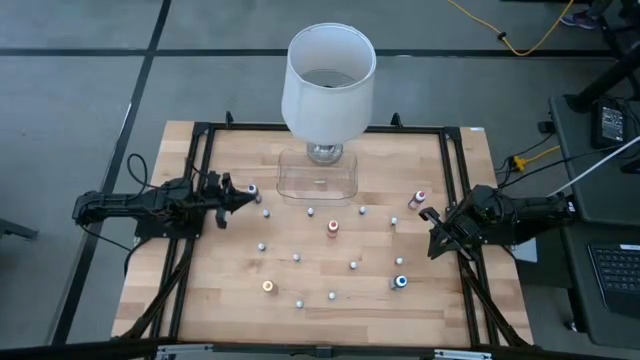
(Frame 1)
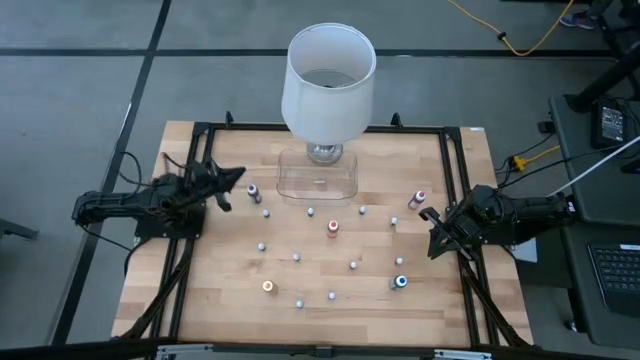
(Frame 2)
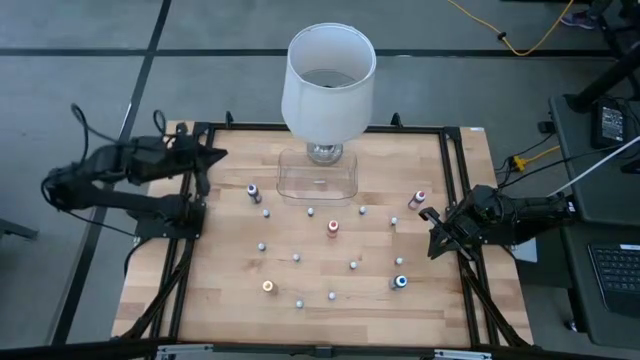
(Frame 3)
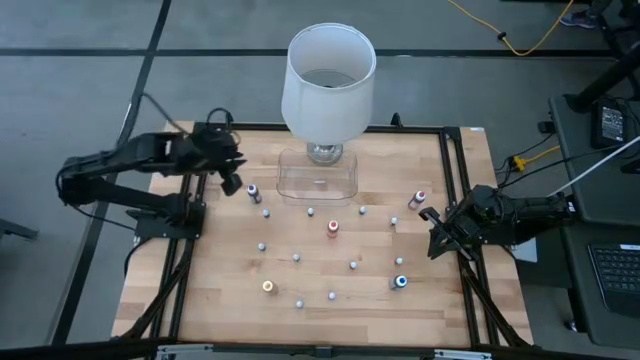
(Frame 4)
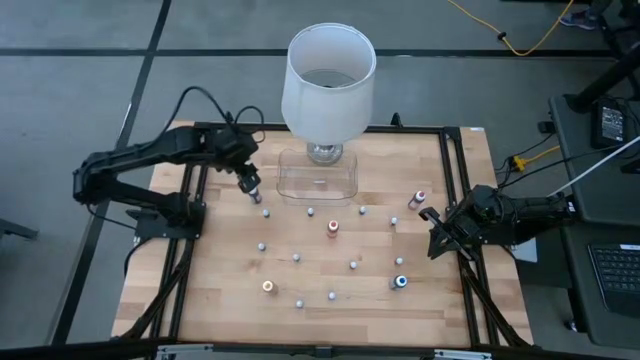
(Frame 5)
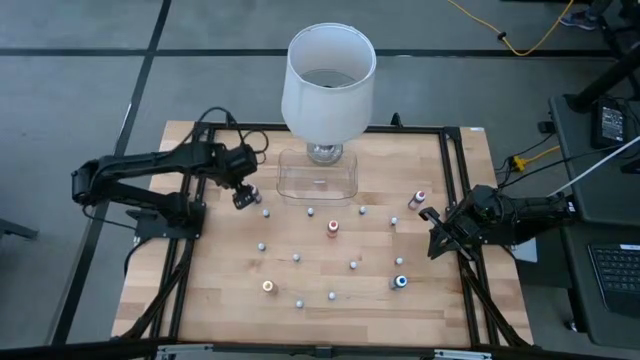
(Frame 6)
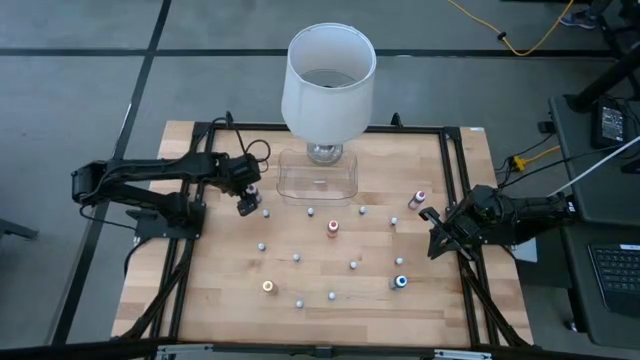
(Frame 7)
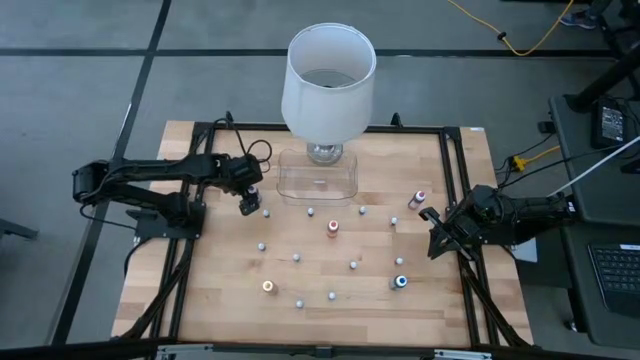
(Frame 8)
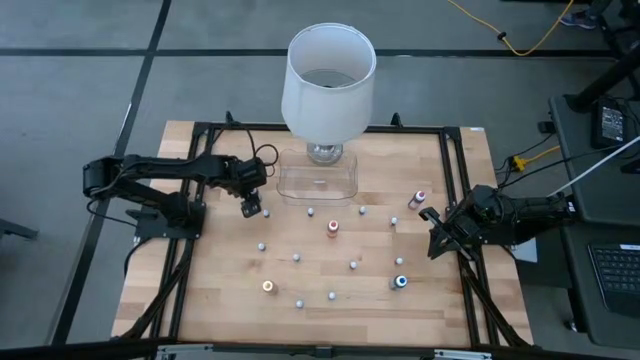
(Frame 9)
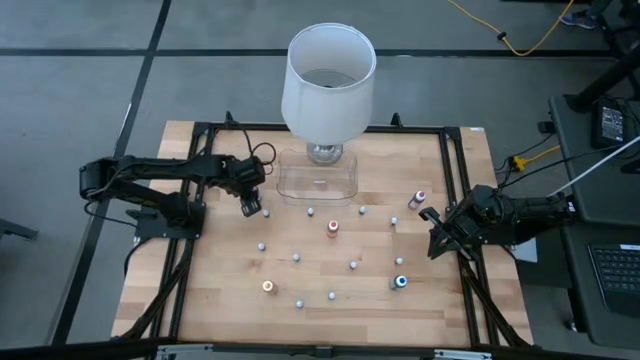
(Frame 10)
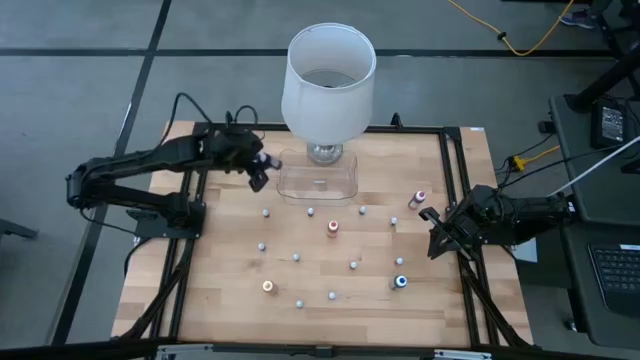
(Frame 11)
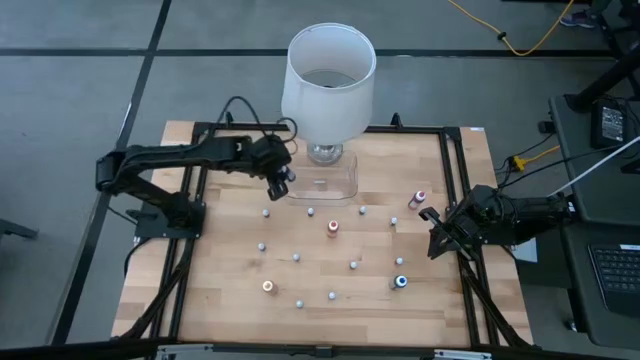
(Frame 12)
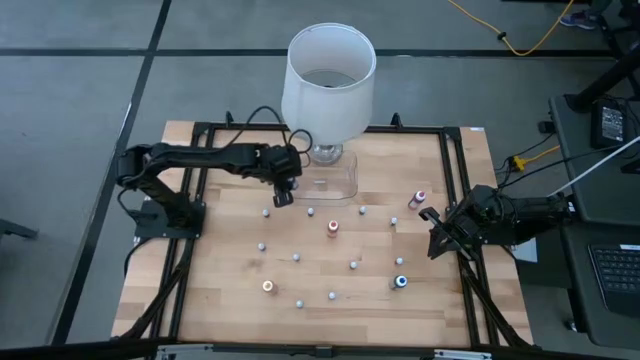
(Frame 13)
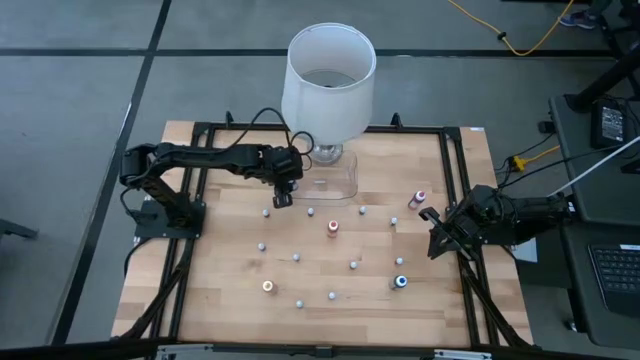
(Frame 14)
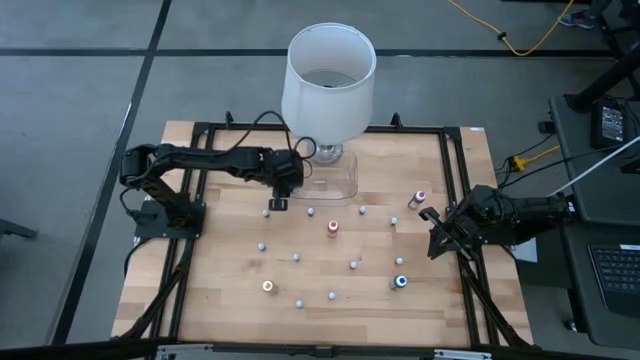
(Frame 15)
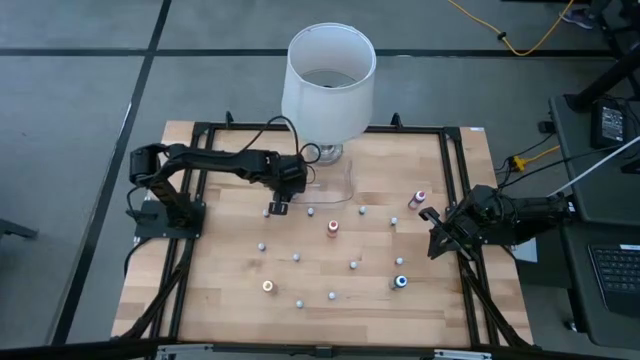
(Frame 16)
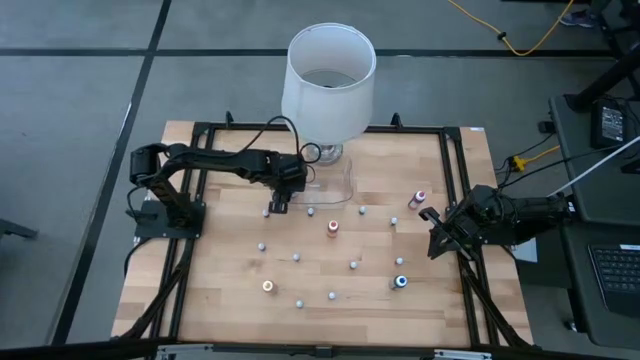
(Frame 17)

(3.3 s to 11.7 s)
Task: Pick & Place food coloring
Put the big purple food coloring bottle into the container

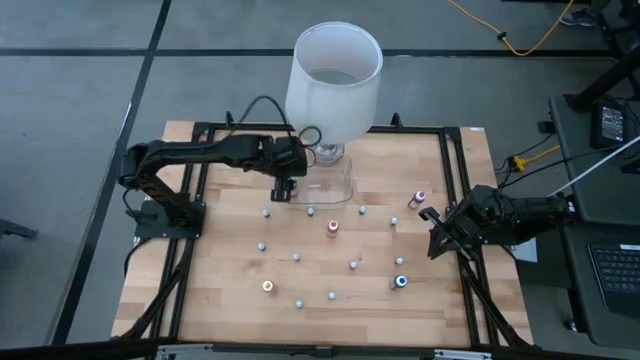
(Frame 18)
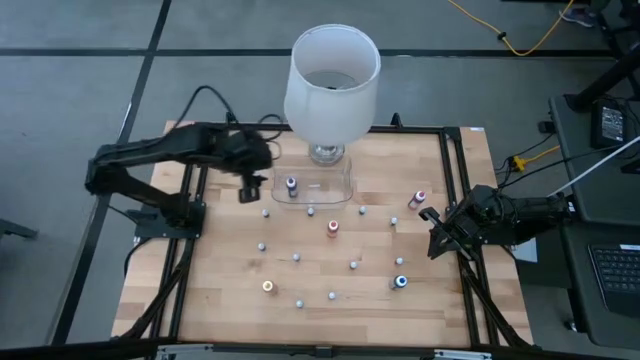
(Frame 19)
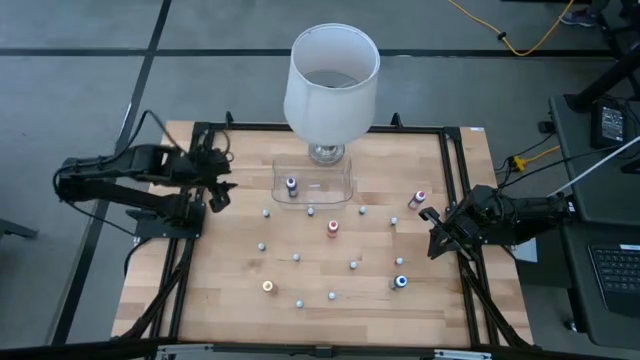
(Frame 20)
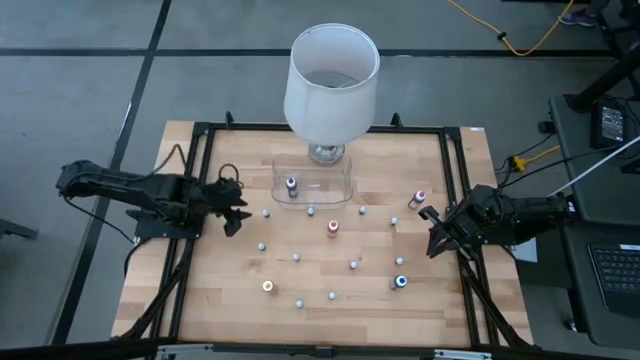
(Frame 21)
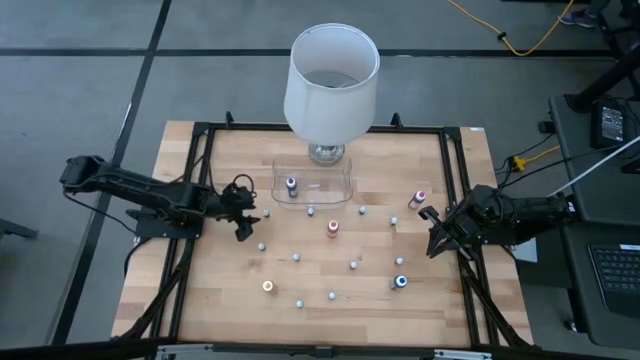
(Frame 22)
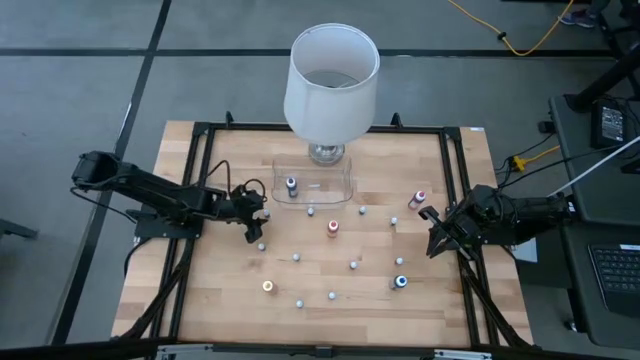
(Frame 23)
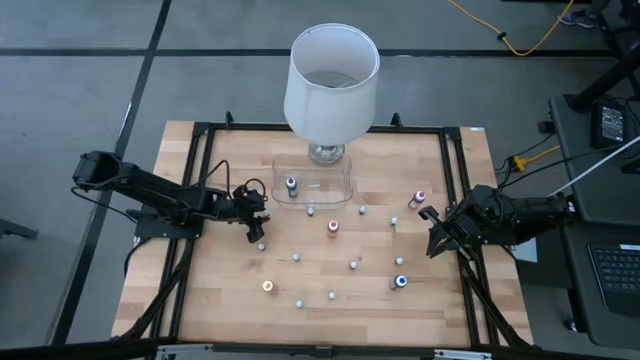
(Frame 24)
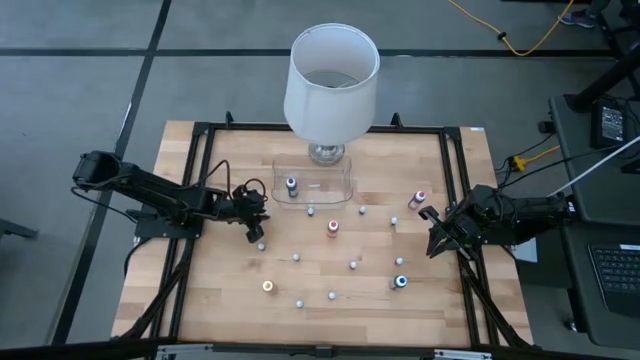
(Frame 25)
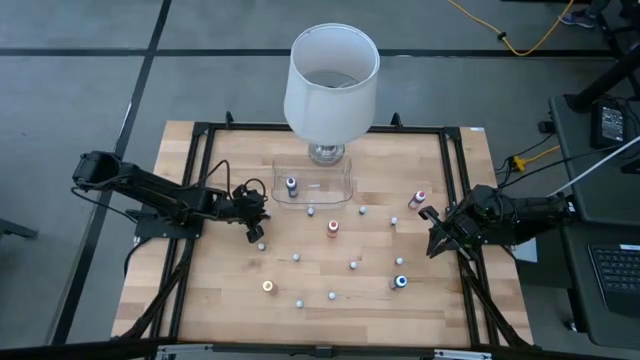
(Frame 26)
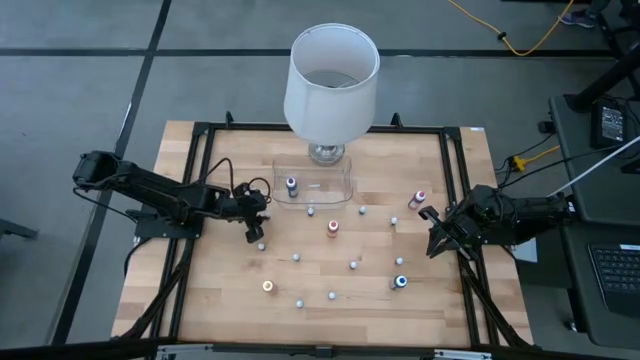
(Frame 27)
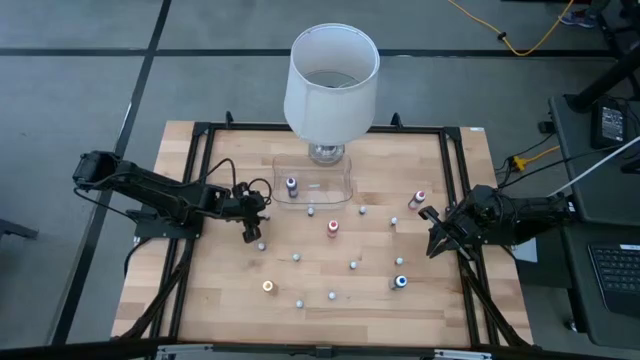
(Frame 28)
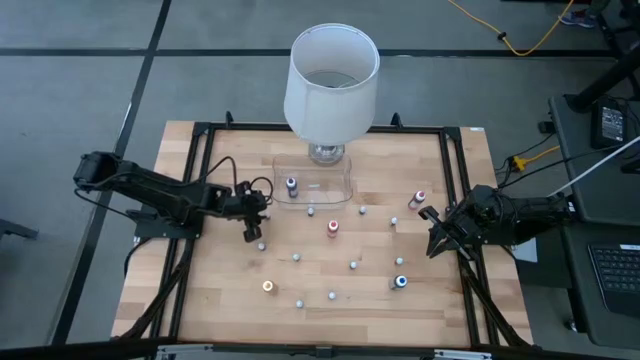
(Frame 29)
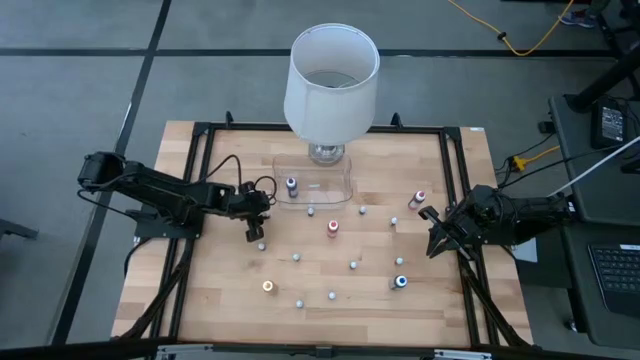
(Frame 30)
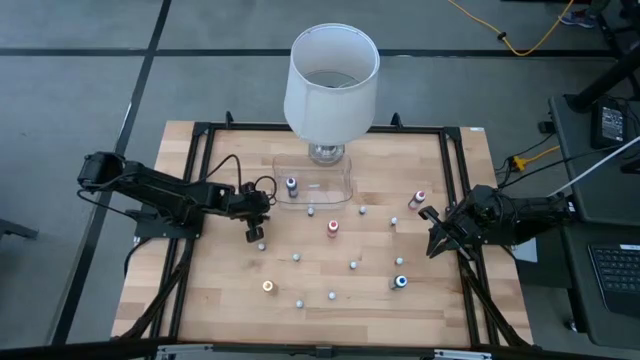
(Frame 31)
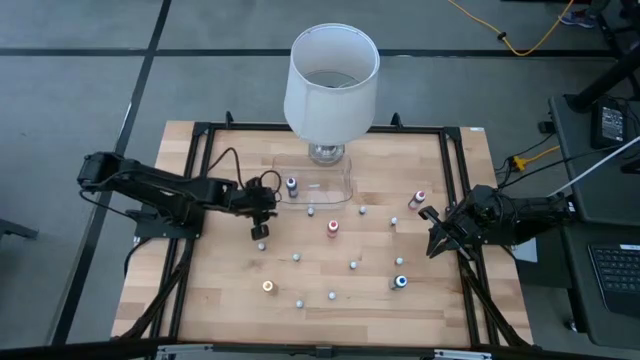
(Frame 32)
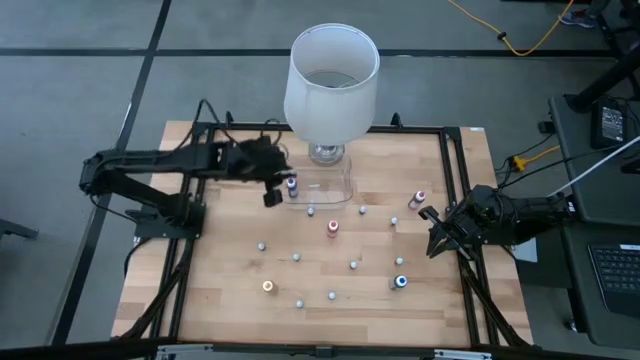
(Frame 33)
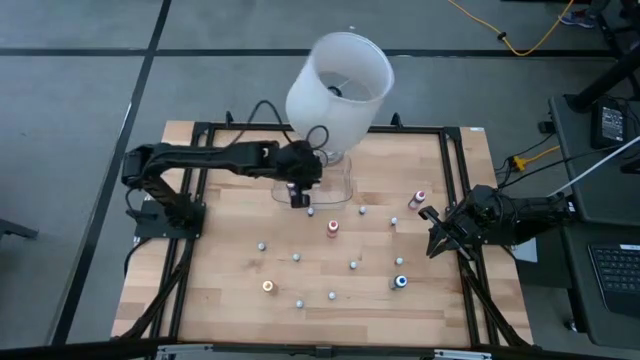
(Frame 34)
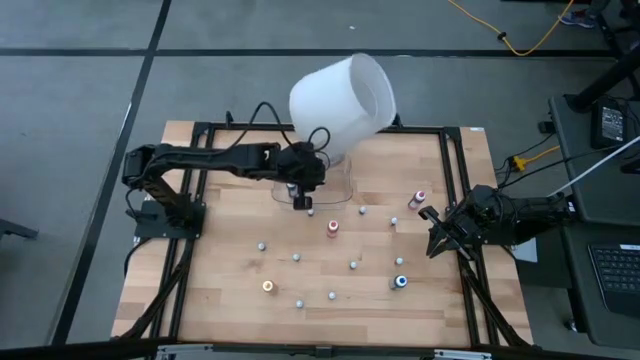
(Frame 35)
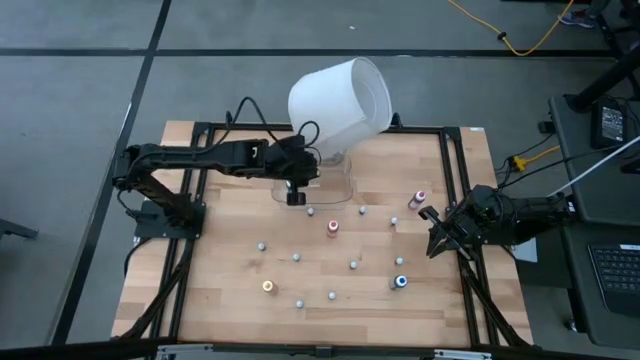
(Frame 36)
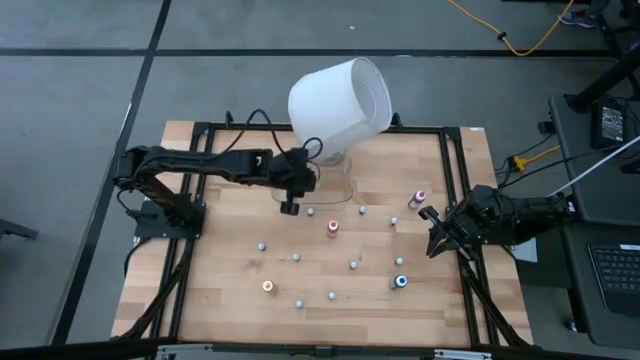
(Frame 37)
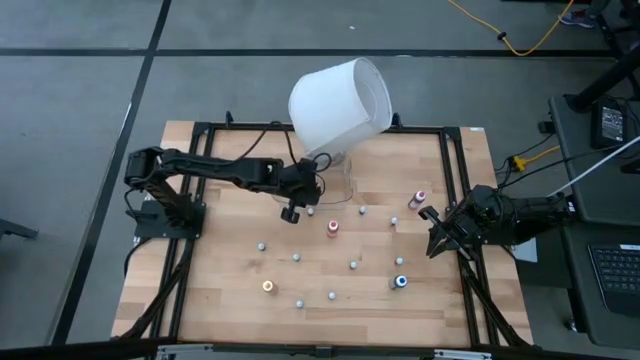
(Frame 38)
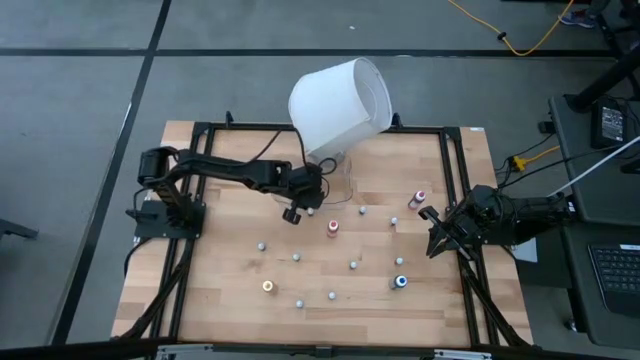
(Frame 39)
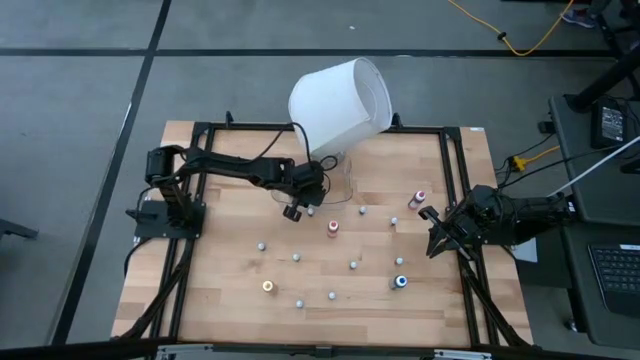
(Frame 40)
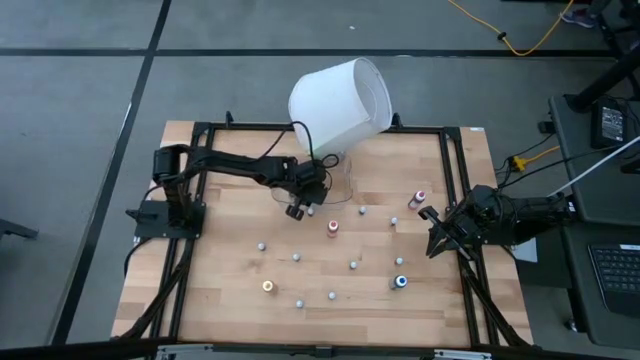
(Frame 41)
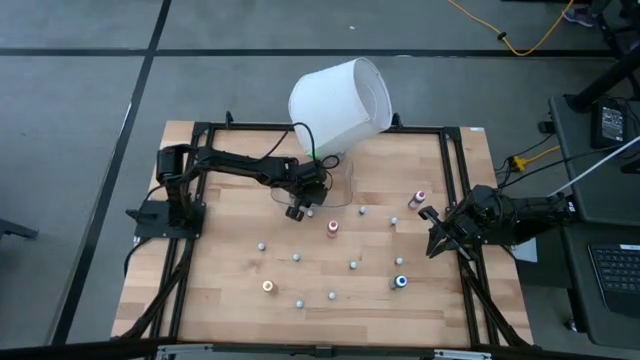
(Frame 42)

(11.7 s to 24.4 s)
Put the top small red food coloring bottle into the container
